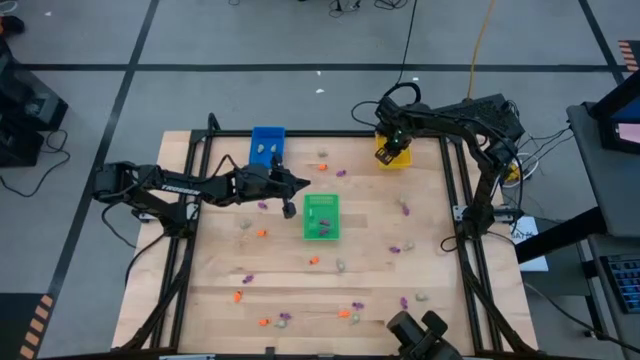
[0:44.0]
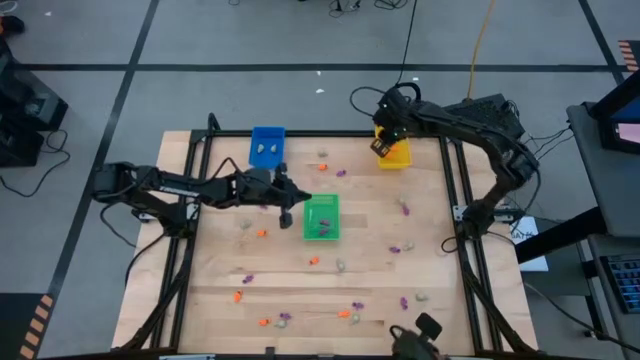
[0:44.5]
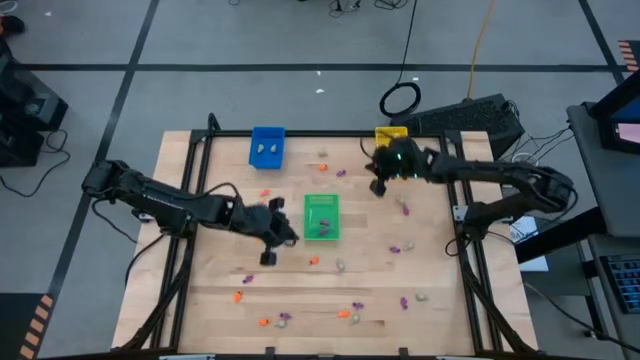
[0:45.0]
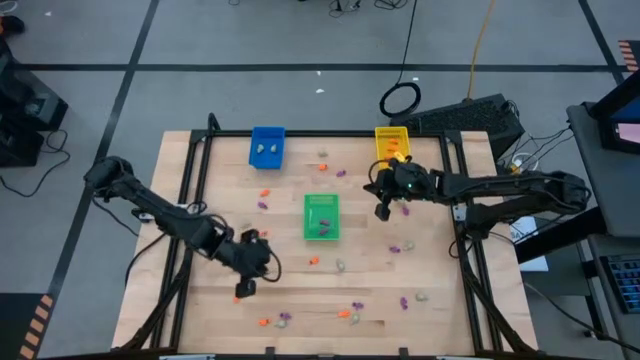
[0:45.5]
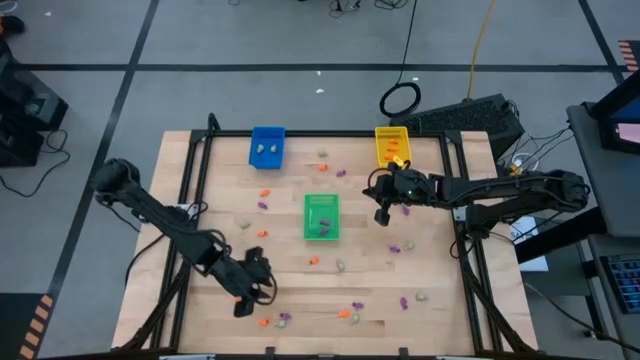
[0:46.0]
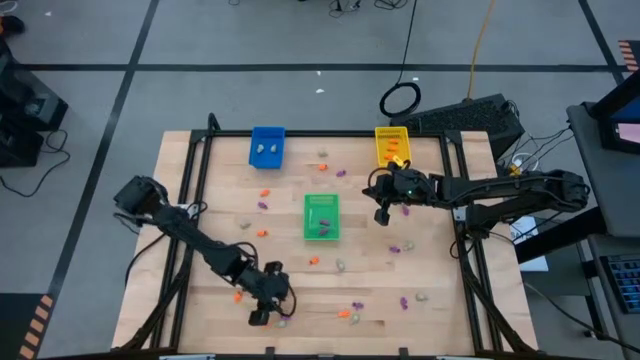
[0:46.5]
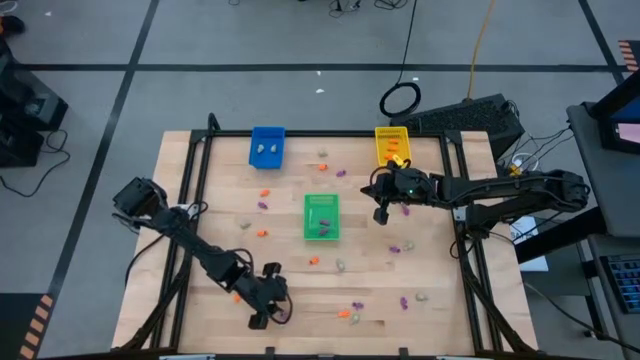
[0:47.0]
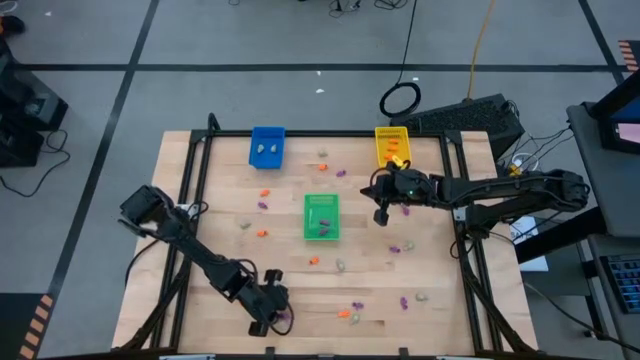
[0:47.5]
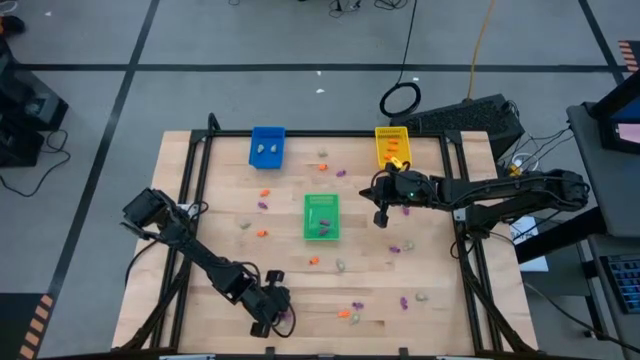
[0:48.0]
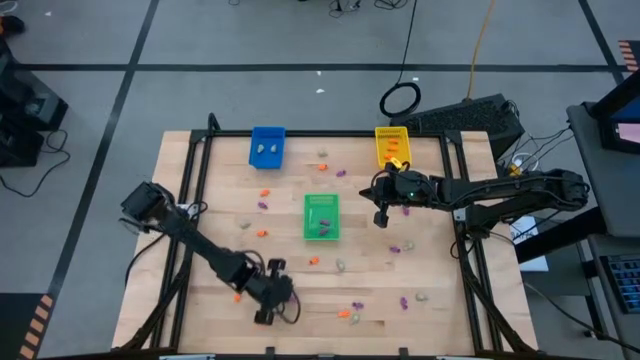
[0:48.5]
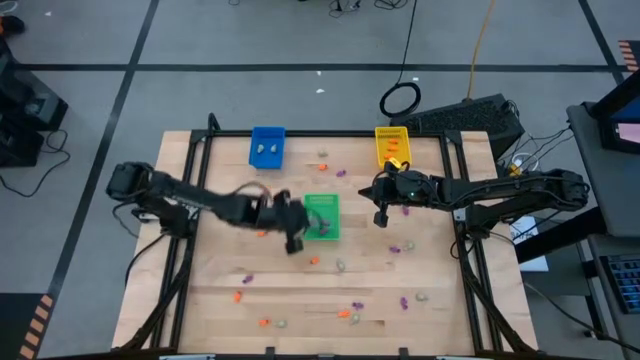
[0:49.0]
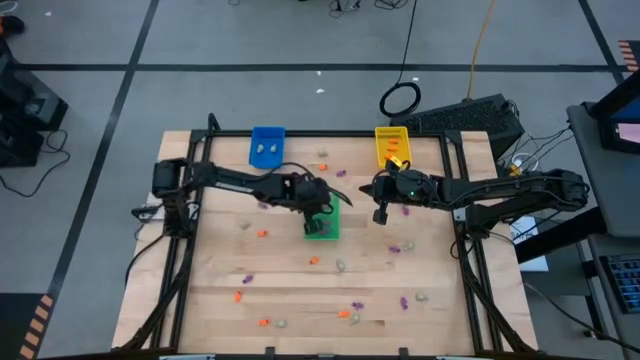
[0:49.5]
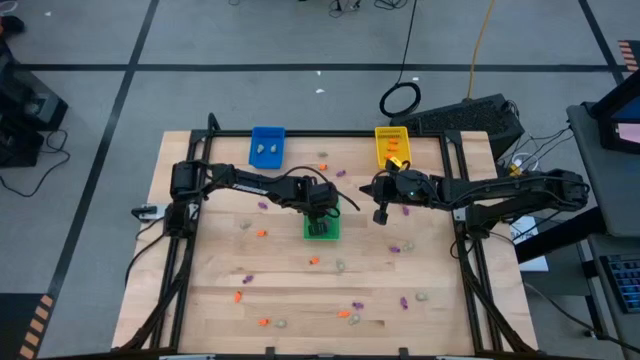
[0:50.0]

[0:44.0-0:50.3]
Task: Sort Halloween decoration
Put the purple skeleton toy into the green bin

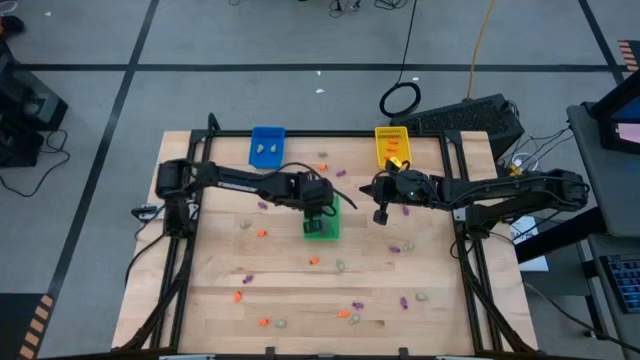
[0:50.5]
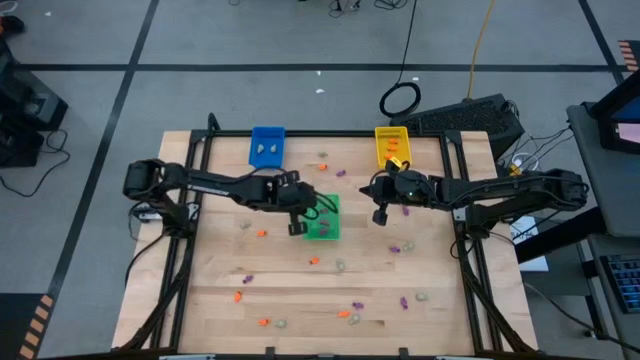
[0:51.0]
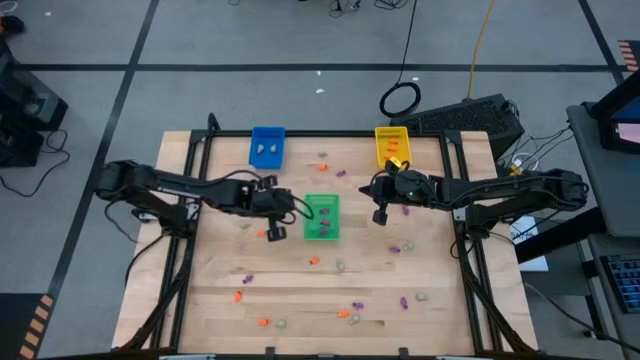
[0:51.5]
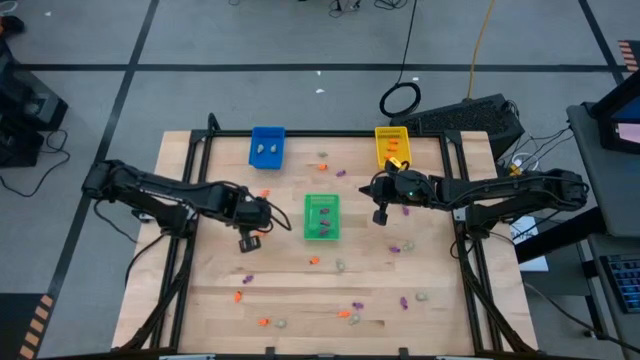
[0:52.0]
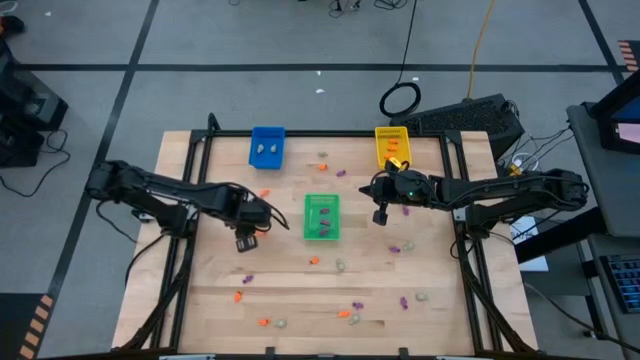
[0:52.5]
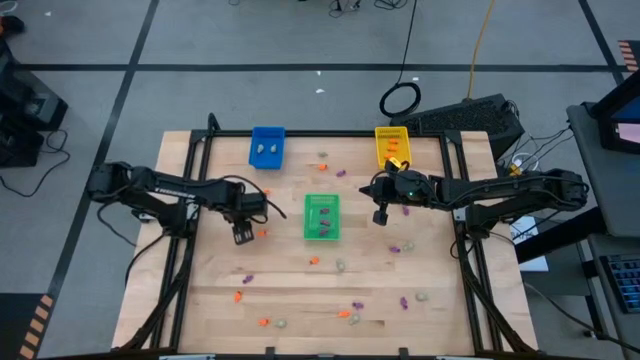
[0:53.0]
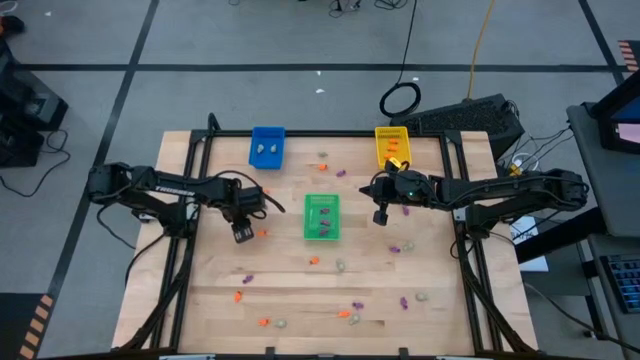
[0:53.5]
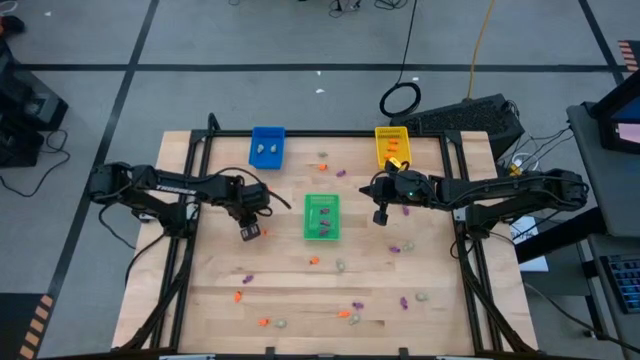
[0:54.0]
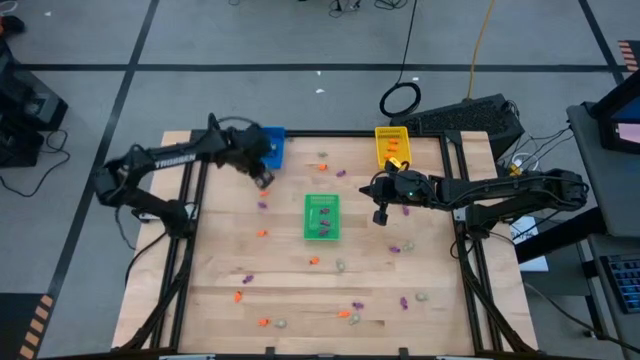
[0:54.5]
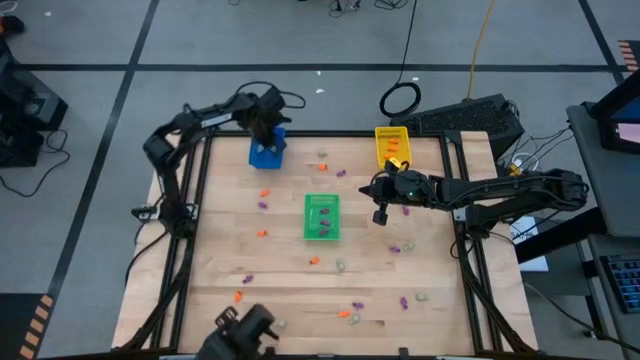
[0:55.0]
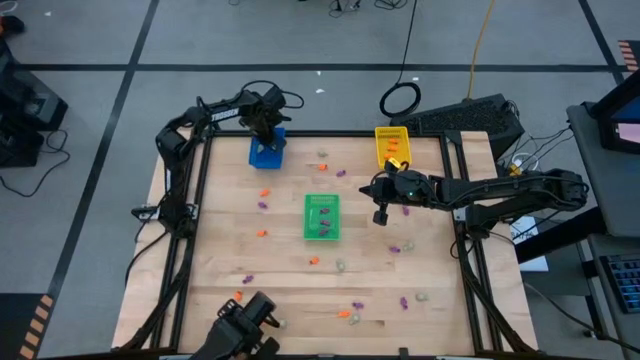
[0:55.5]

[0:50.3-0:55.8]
Put the white skull toy into the blue bin

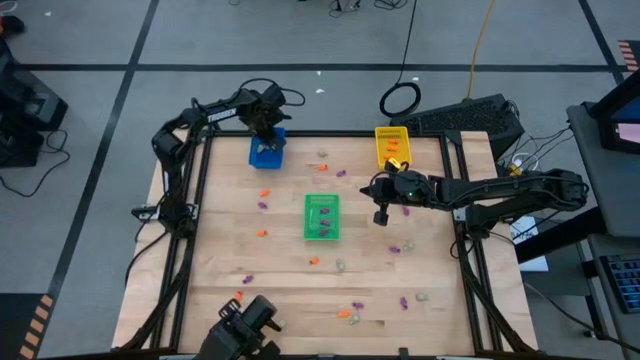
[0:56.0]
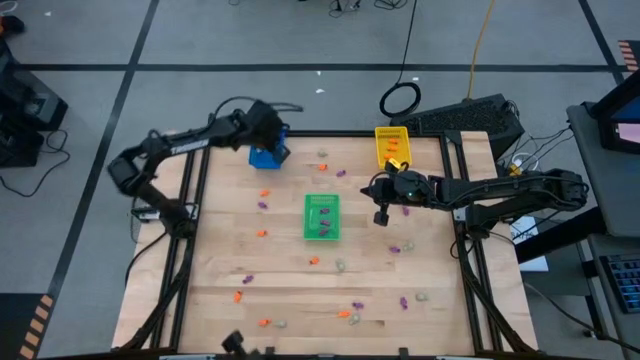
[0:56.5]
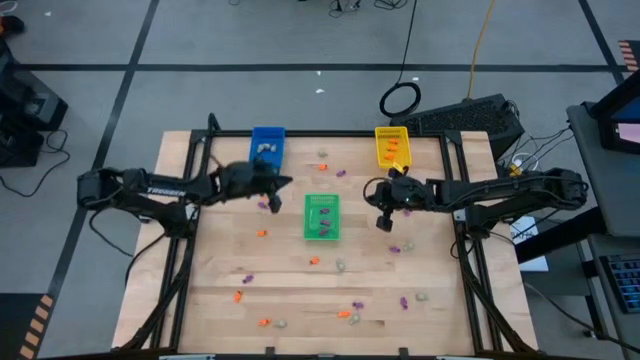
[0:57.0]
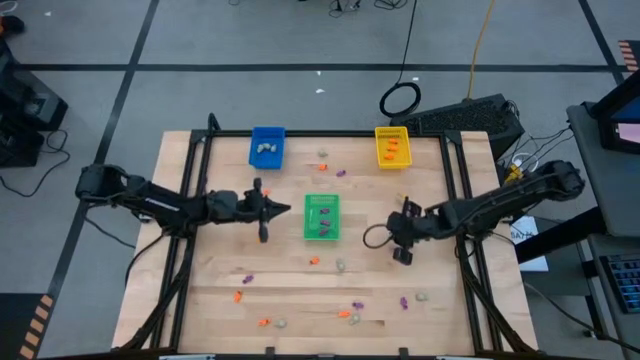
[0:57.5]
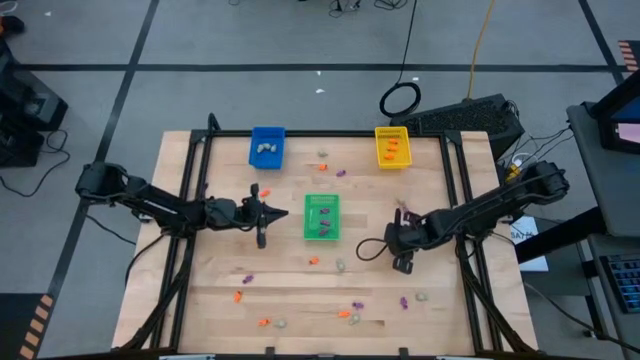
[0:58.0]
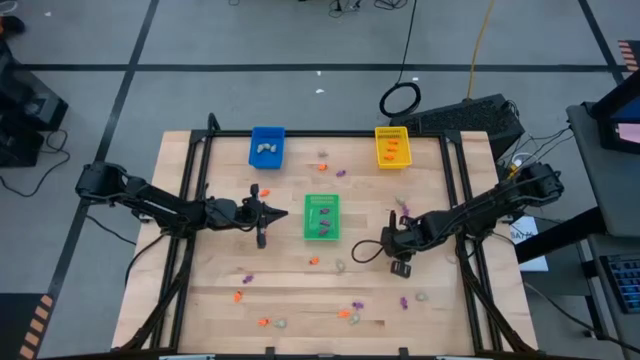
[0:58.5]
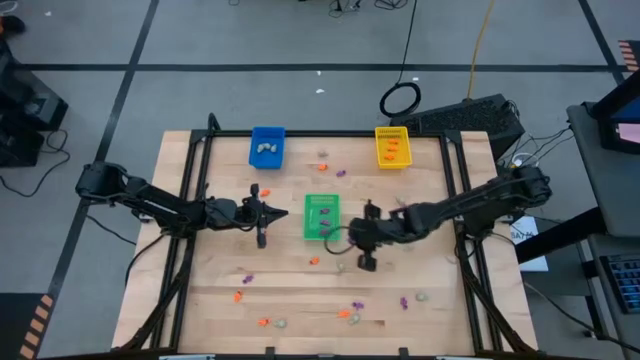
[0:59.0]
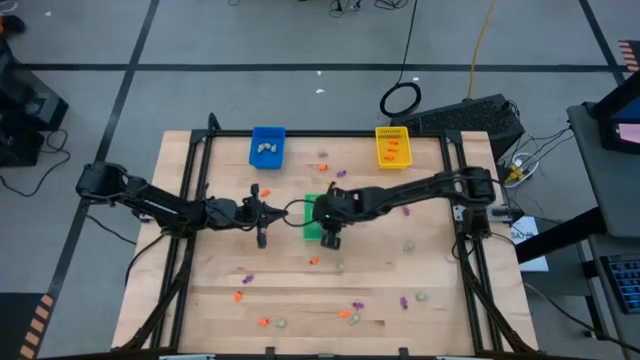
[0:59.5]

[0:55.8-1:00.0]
Put the purple skeleton toy into the green bin

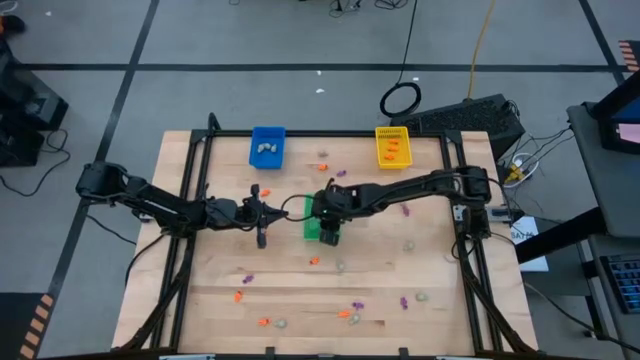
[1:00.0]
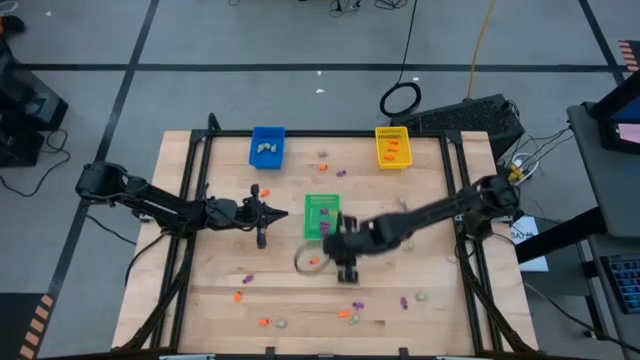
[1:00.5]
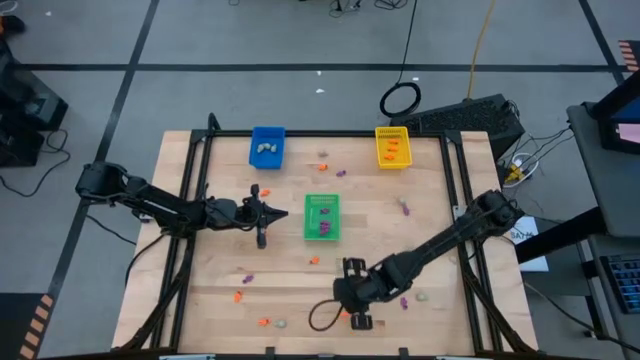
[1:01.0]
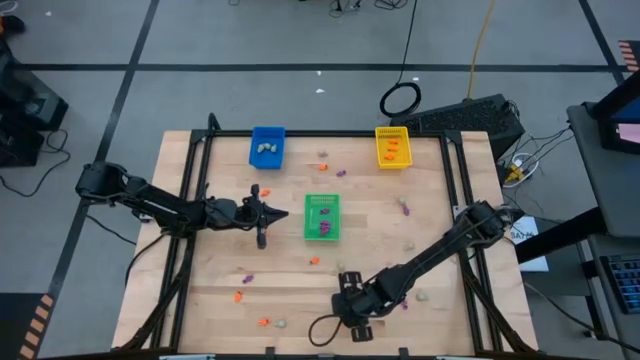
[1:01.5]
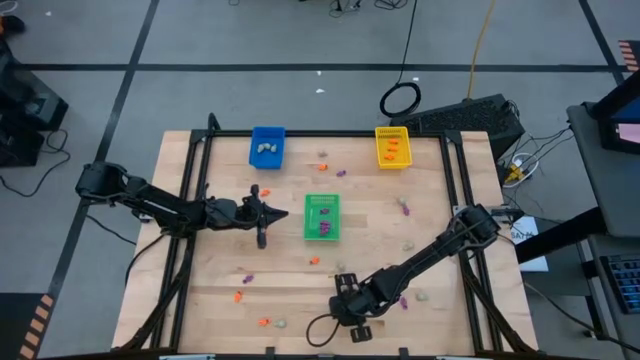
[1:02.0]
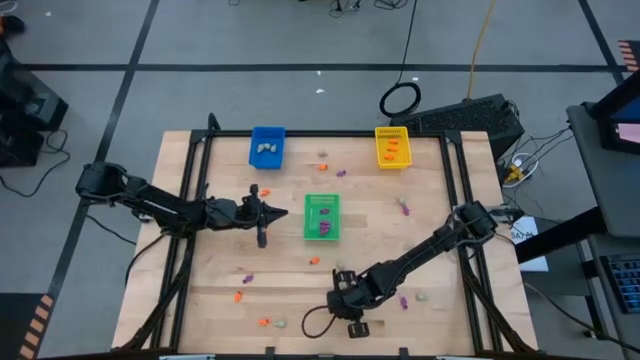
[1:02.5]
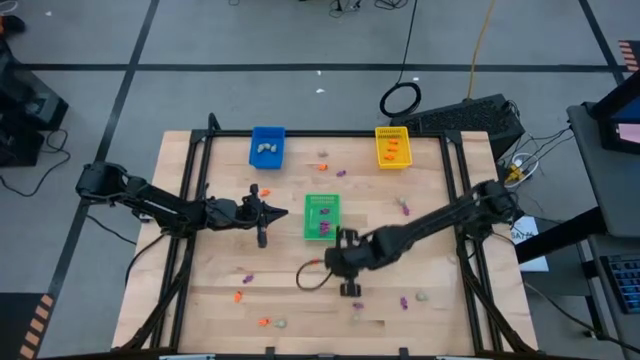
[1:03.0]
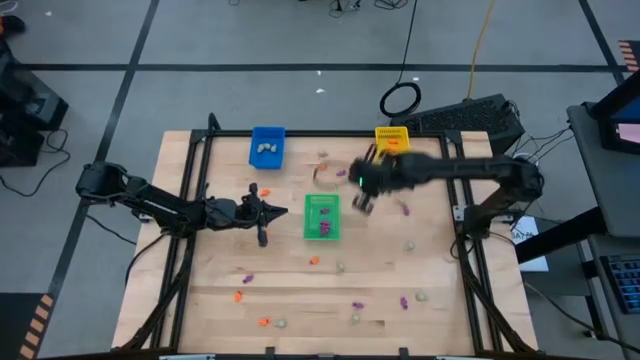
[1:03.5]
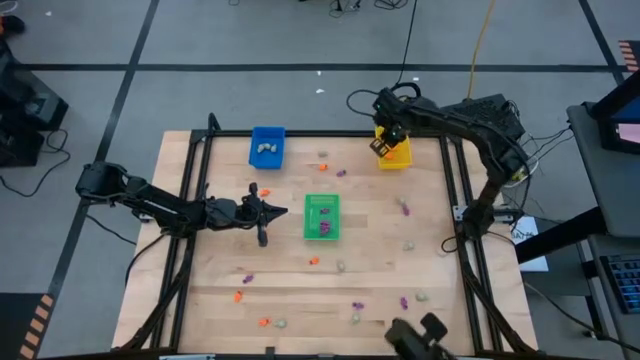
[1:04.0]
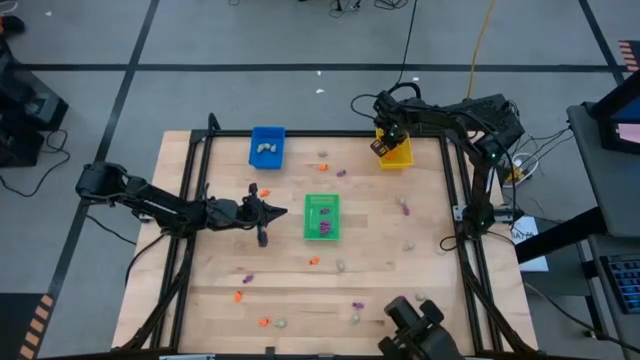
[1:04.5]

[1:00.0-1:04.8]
Put the orange skeleton toy into the yellow bin
